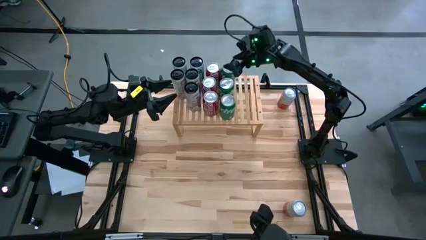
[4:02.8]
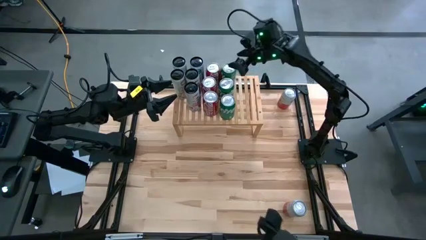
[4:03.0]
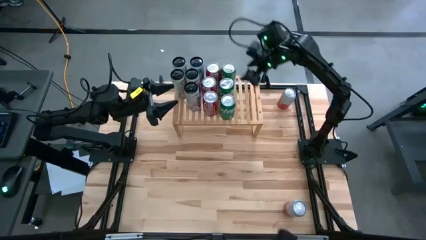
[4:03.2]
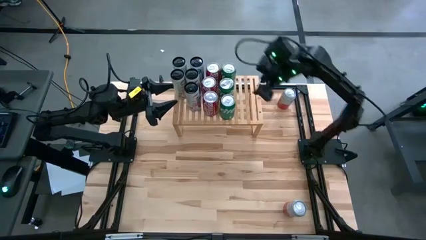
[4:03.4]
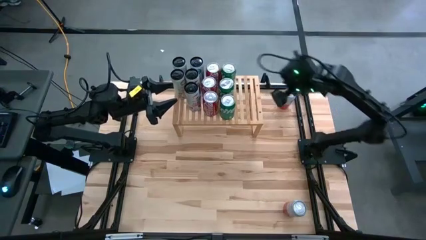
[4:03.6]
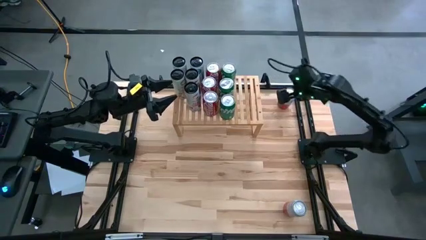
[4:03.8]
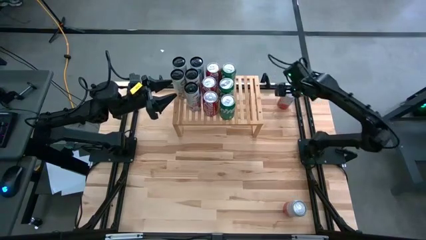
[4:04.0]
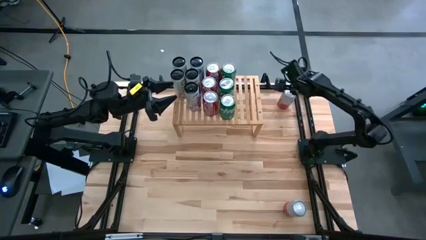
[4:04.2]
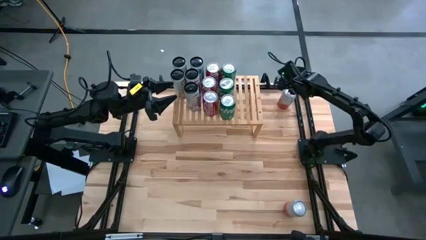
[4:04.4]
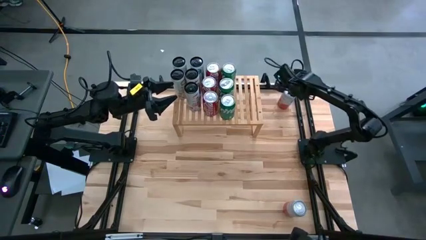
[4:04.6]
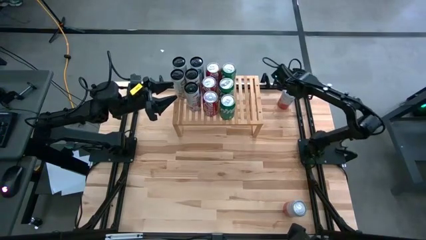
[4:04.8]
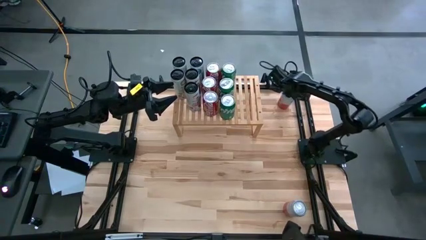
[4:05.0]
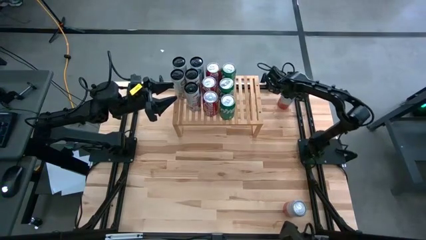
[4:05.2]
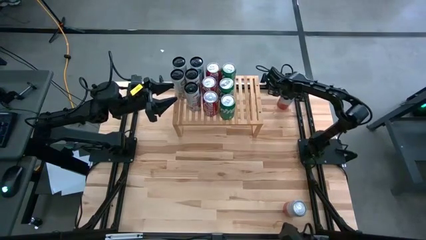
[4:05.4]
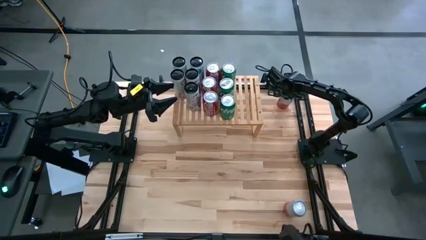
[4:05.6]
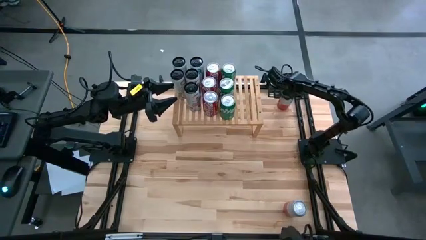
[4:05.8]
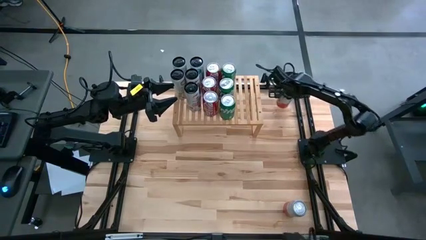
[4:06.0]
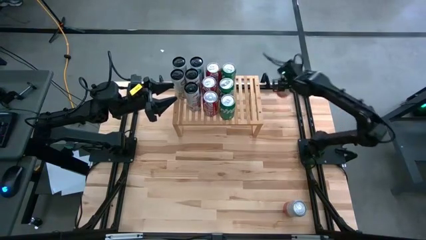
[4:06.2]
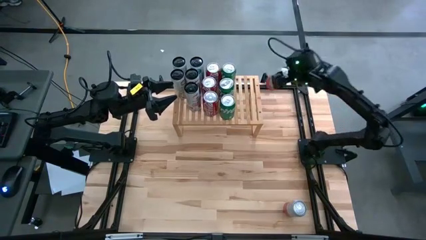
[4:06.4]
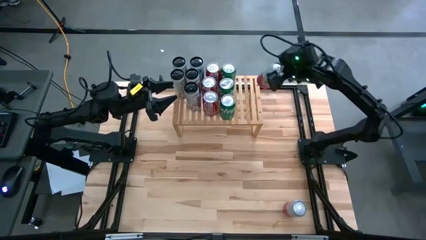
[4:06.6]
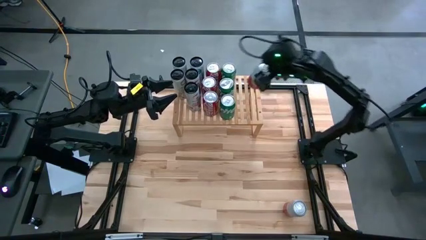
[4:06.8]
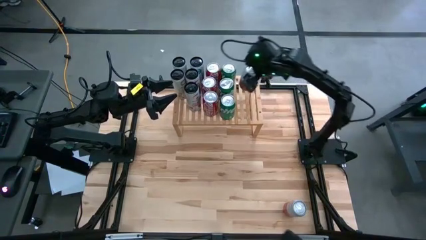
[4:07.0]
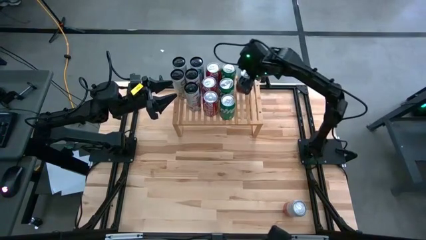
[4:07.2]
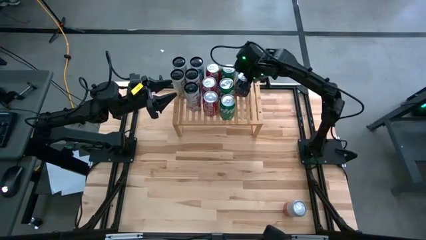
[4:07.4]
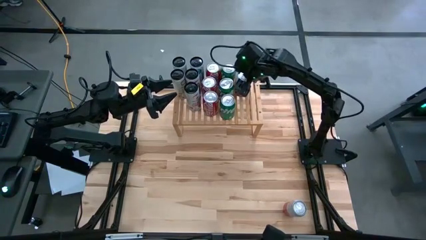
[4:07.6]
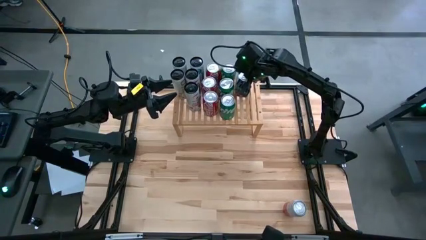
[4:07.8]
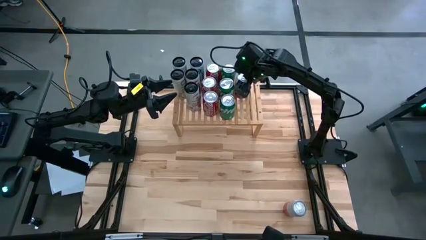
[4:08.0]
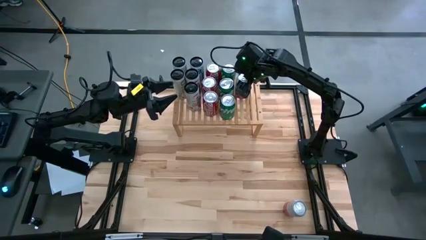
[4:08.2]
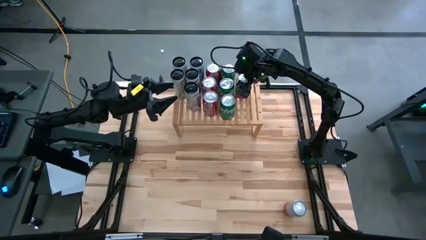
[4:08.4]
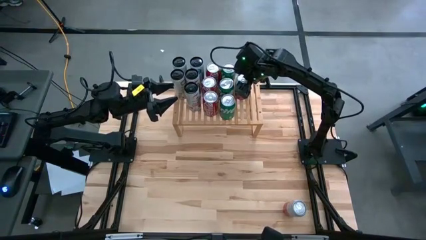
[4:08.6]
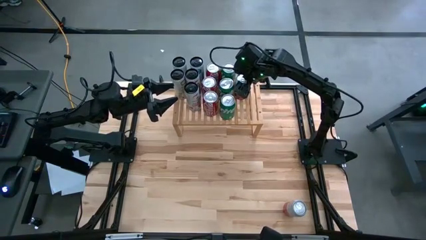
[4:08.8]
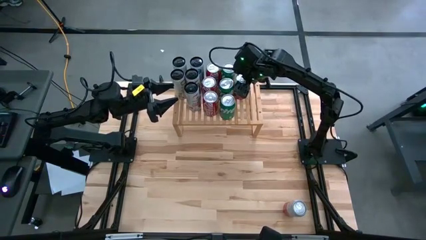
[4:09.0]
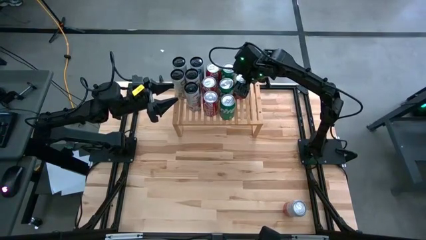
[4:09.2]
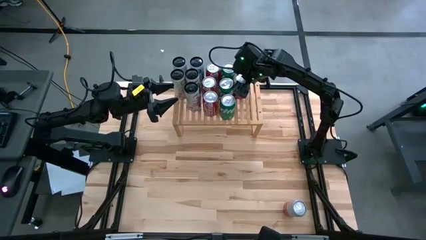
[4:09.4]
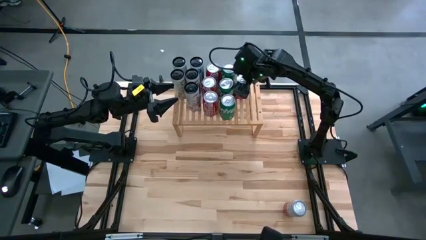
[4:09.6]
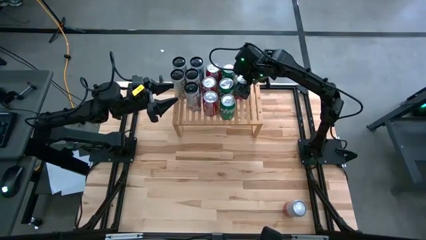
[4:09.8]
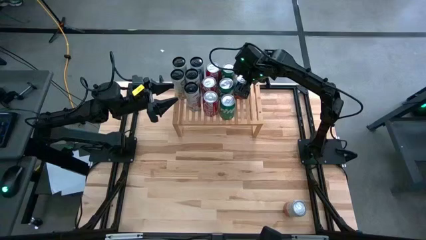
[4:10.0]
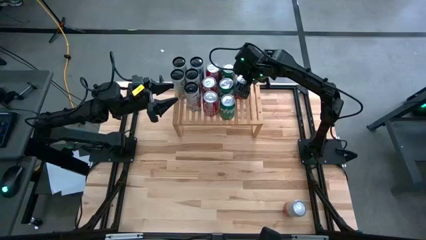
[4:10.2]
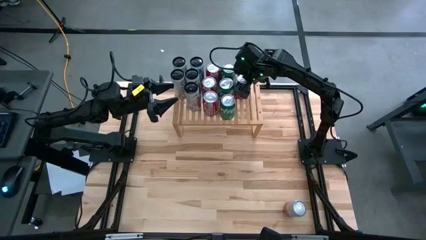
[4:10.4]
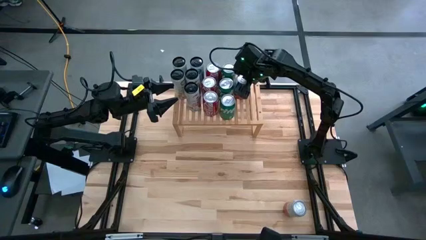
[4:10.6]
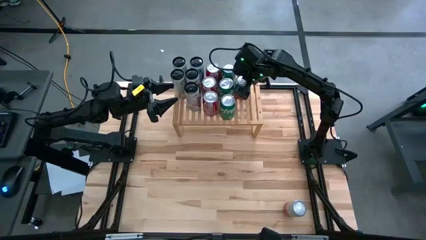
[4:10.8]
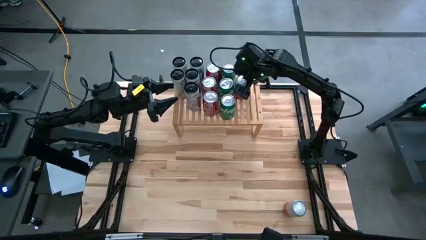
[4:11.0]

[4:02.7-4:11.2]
Task: Place canned beverage on shelf
Put the top pink white soda can on the shelf

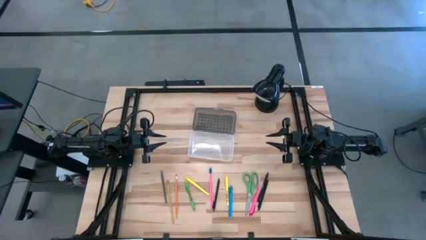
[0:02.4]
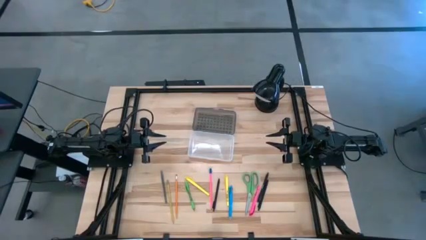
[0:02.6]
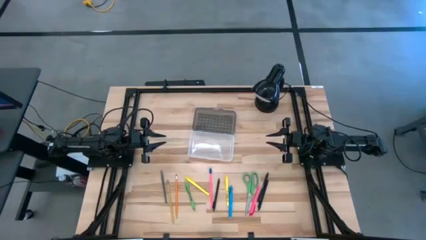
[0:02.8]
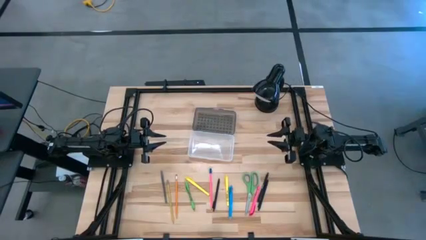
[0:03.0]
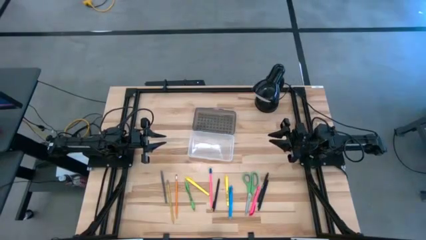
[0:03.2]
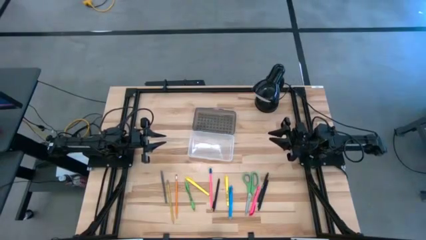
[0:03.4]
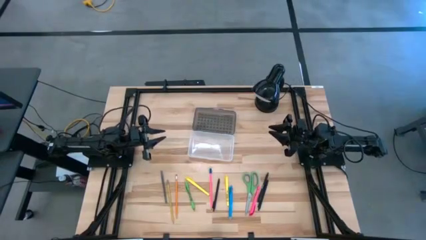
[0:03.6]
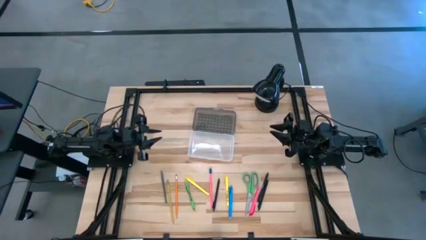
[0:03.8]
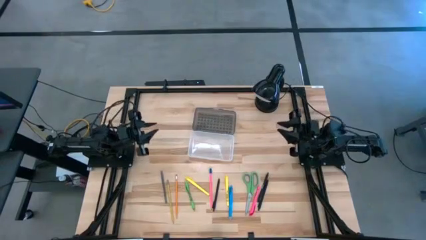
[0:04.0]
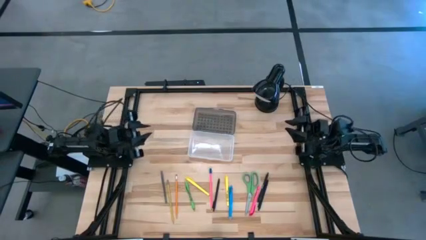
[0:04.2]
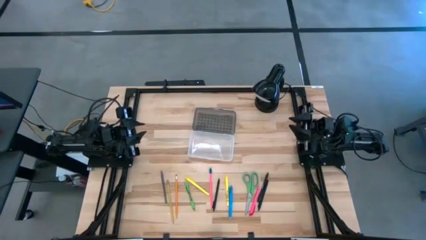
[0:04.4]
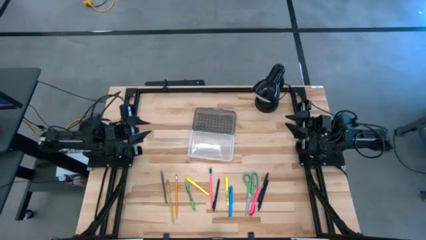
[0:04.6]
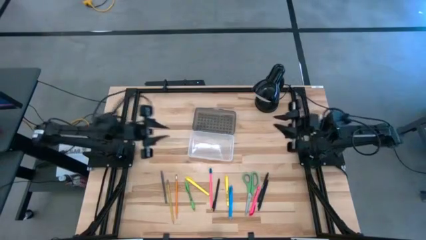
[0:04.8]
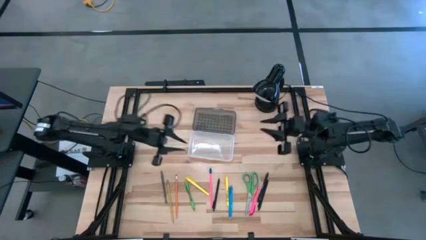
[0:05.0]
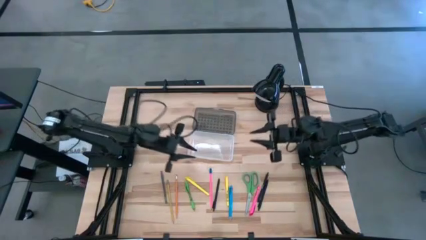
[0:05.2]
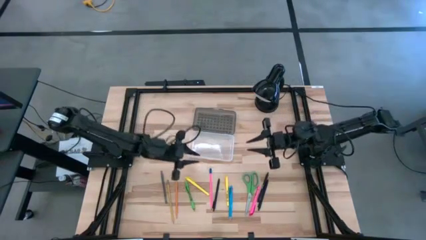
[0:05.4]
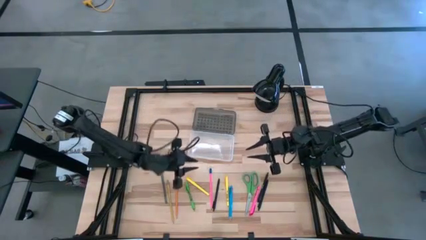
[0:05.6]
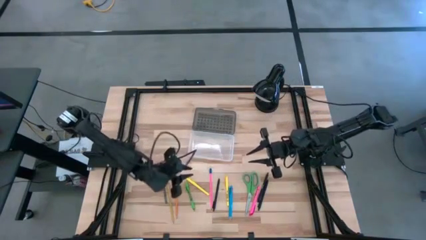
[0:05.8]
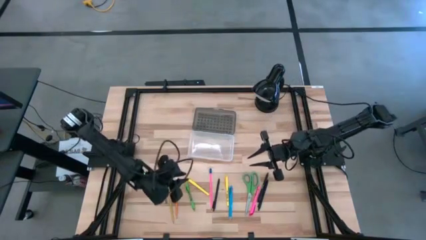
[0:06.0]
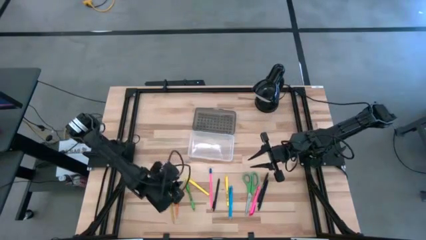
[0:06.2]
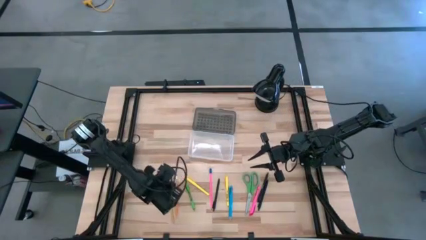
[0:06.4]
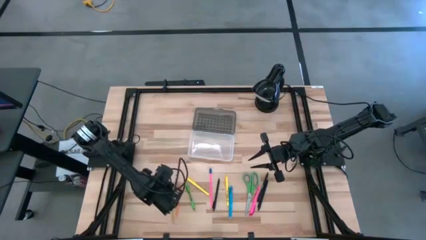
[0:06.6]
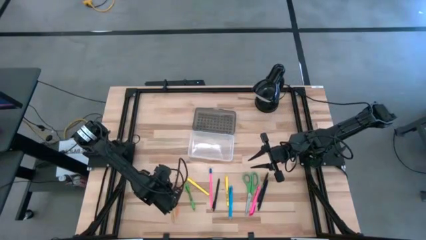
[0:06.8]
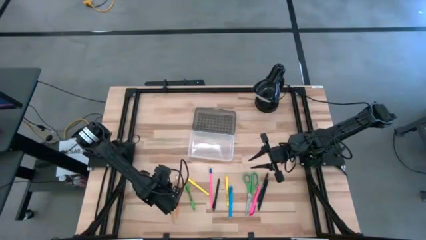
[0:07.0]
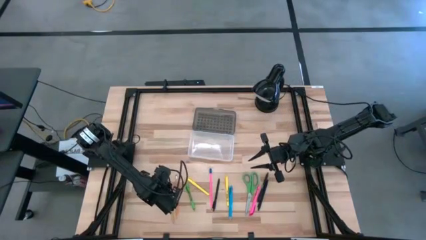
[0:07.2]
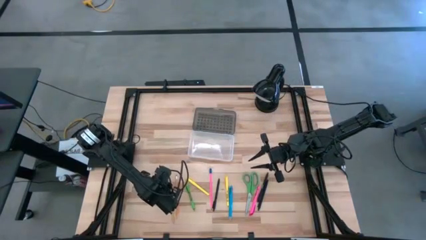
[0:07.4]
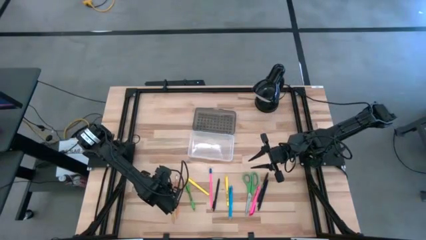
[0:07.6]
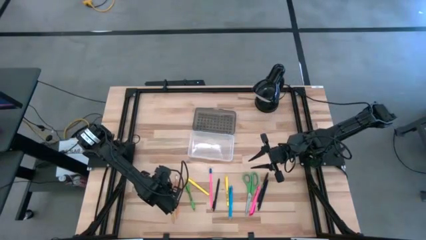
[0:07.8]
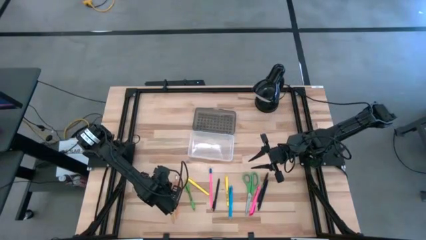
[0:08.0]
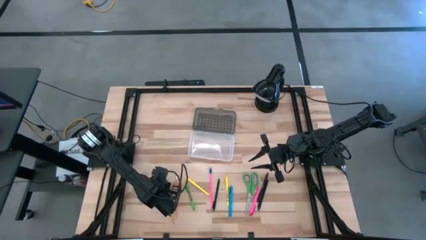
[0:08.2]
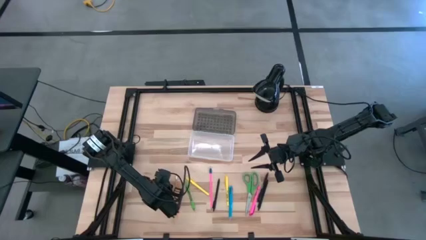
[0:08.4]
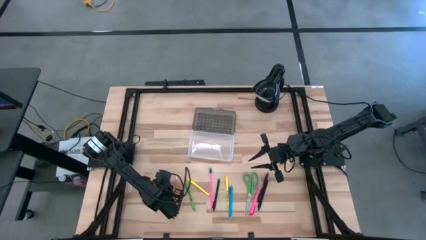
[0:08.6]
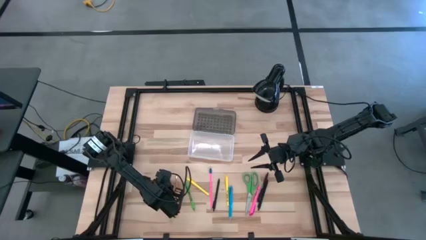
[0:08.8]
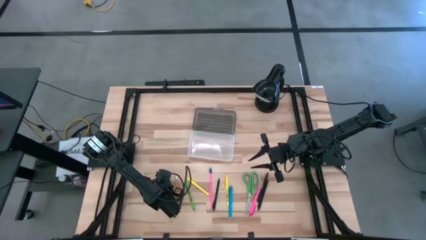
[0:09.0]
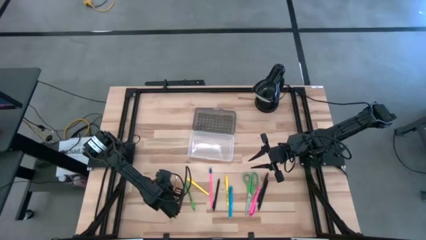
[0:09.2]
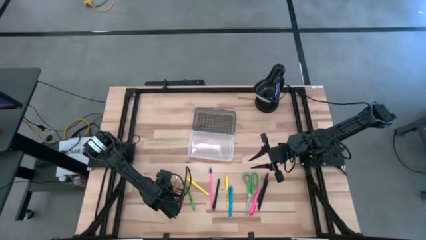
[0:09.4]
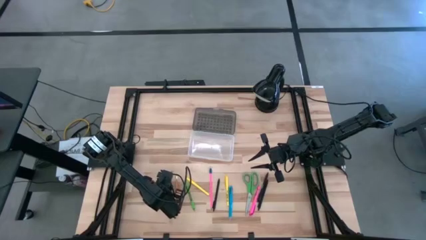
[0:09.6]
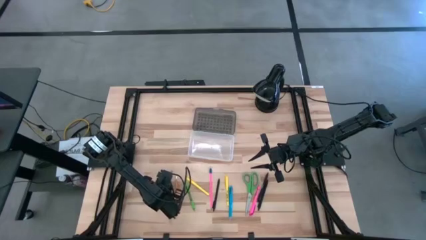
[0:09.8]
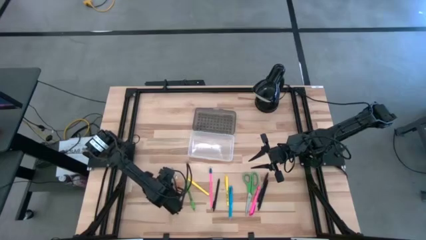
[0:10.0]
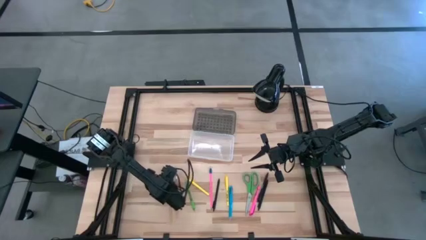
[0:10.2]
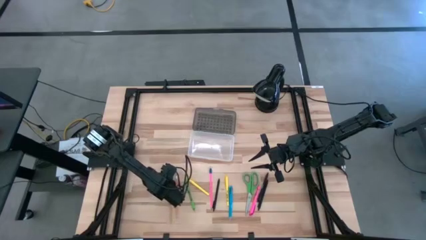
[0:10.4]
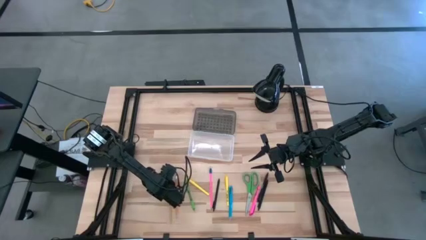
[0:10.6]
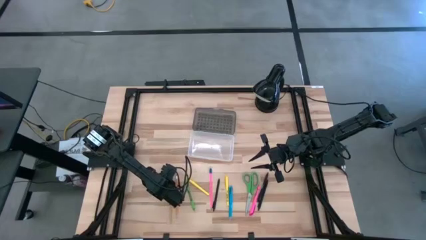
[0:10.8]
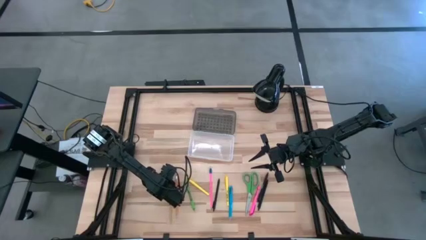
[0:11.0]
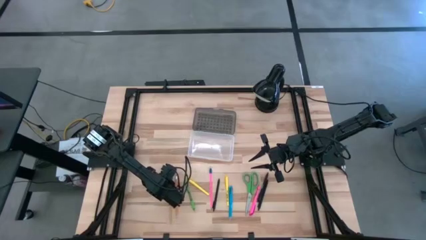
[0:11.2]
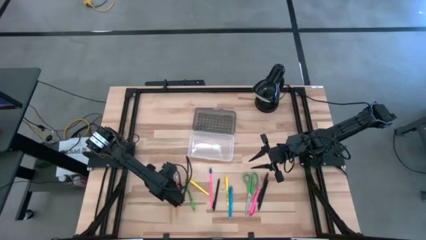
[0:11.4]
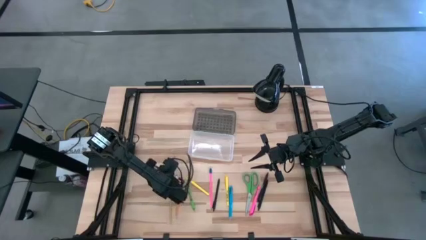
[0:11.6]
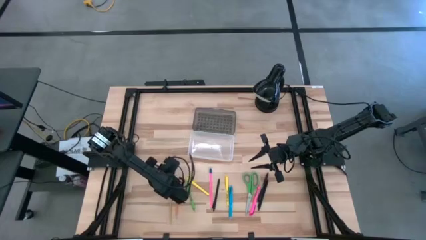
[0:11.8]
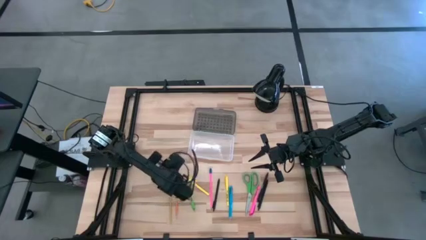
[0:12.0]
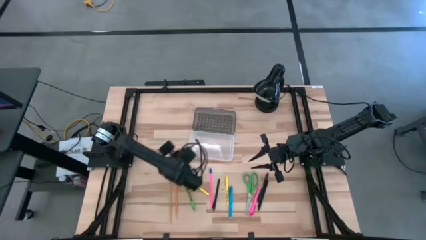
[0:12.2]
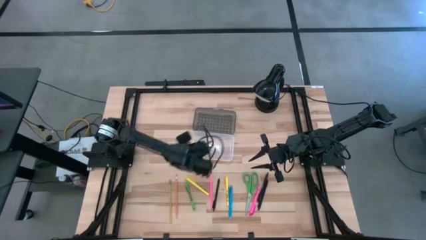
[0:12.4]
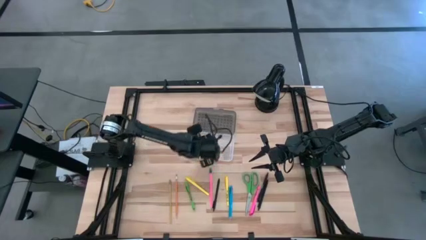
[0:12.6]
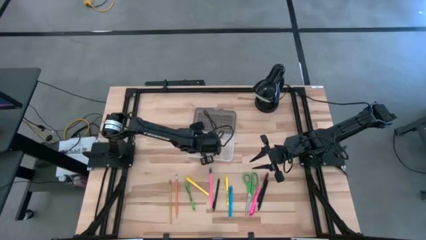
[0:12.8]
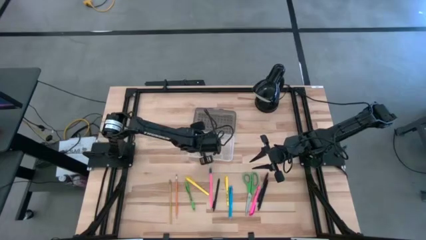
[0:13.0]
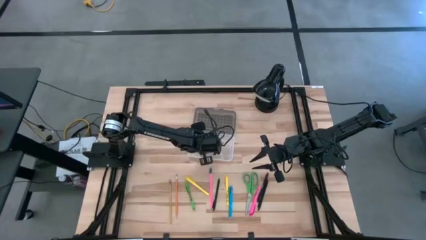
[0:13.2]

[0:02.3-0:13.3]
Task: Pick & place school supplies into a supply box
Put the gray pen into the transparent supply box
